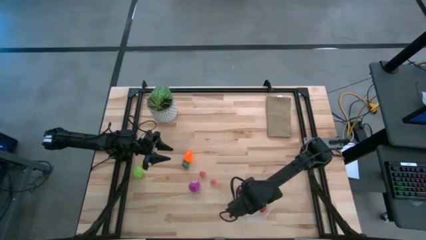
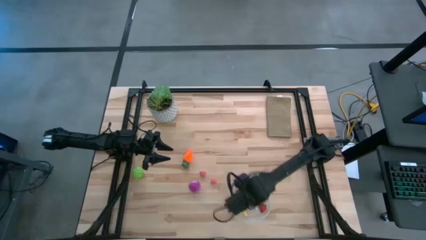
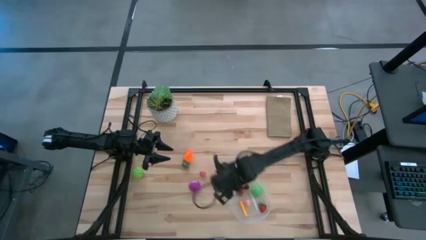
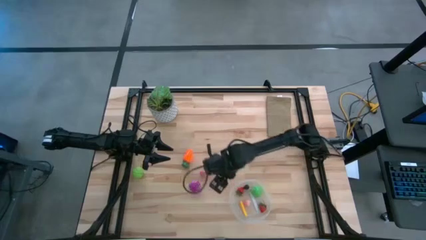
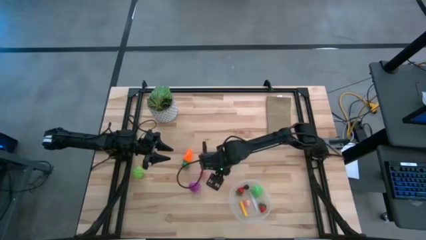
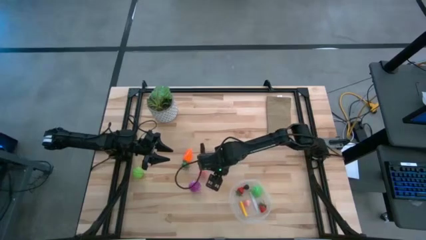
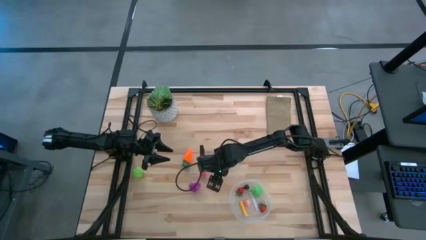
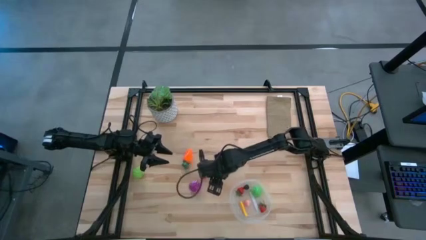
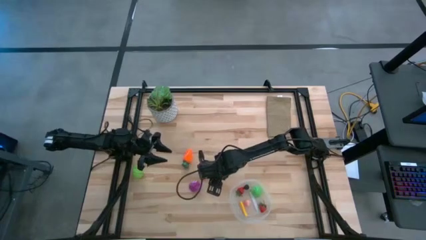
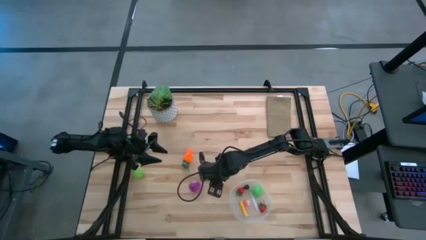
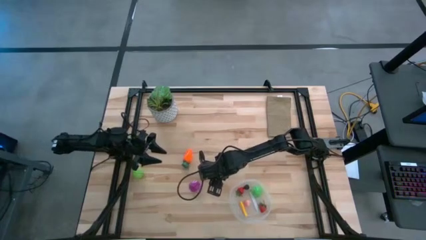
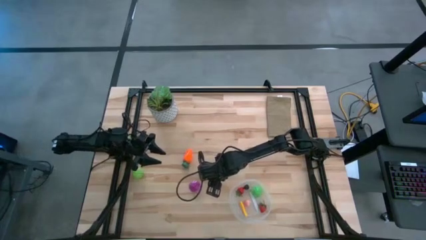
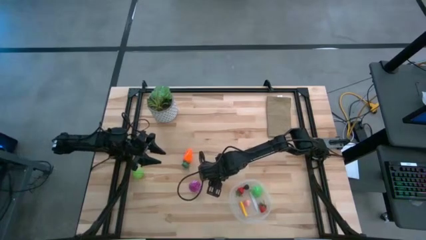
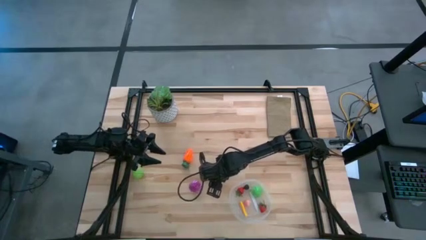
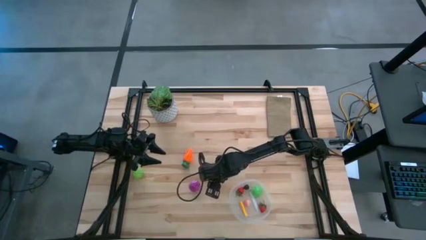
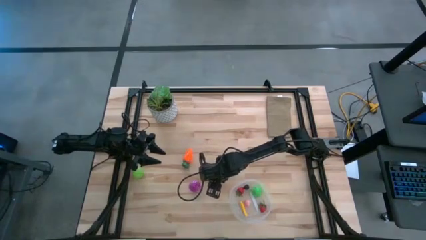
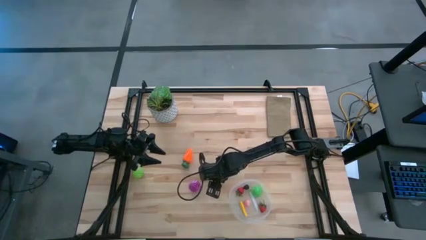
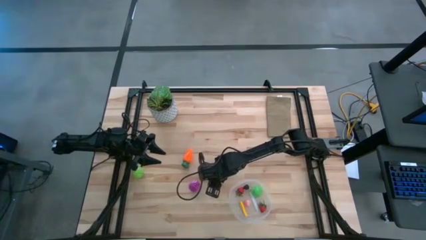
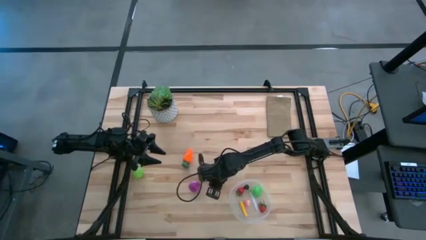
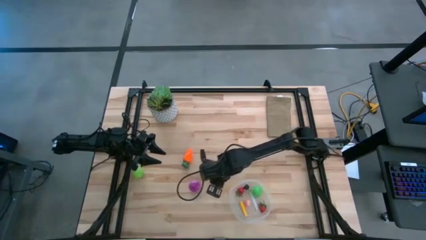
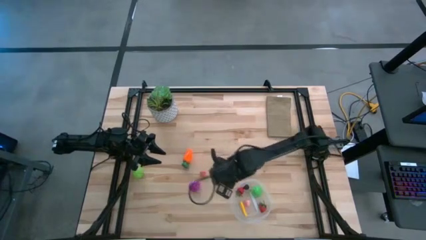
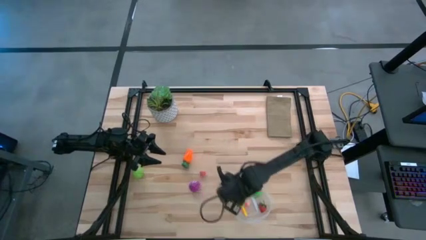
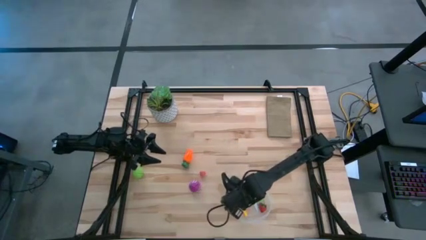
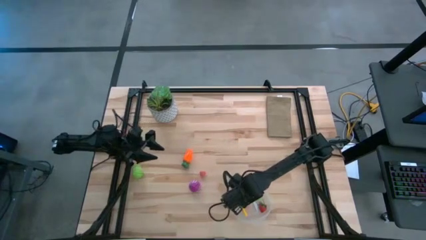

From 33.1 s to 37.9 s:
Task: Pick and placing Produce into tupperware
Put the bottom peach into the transparent bin

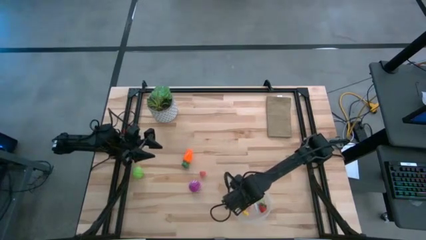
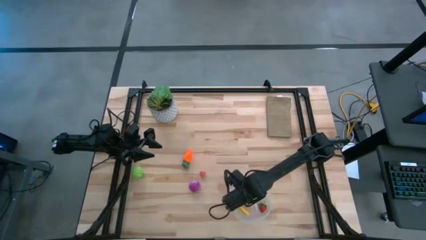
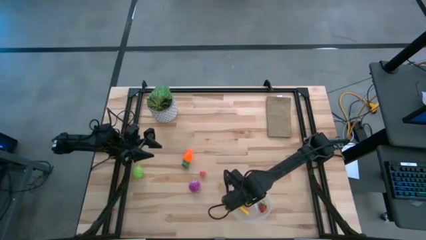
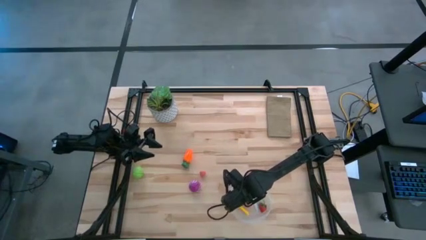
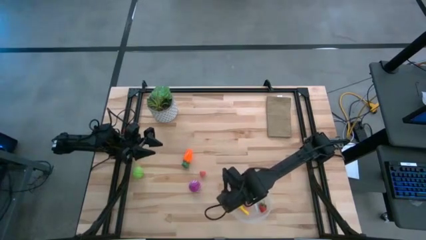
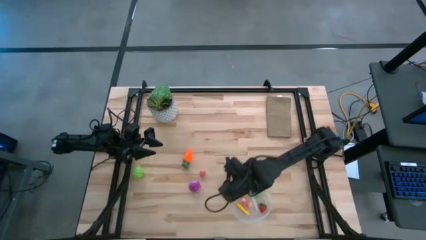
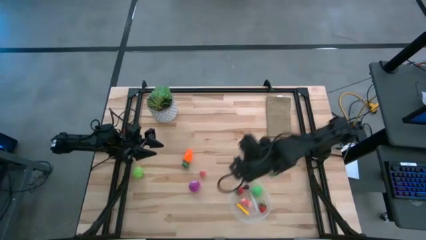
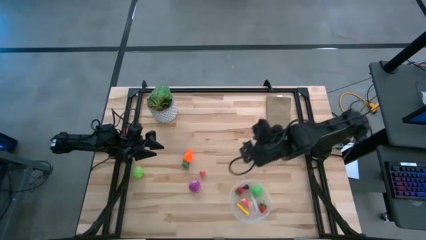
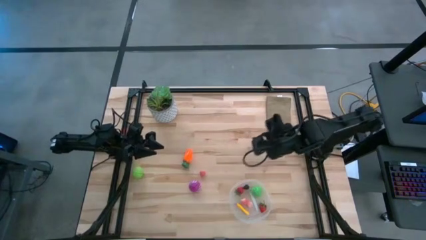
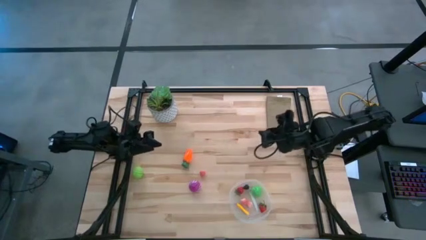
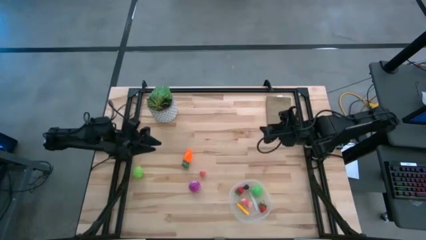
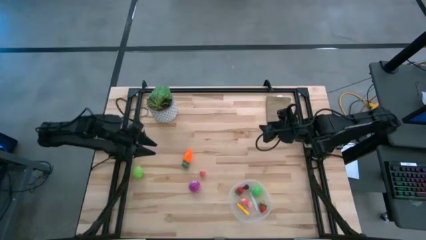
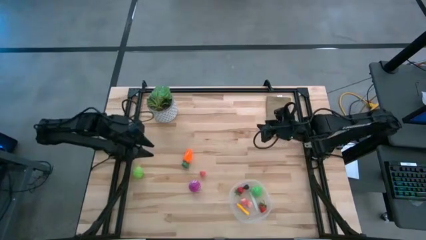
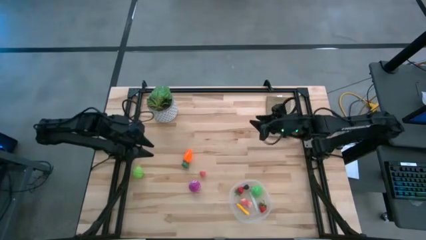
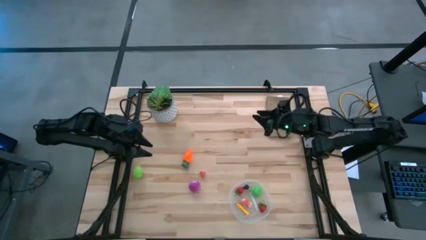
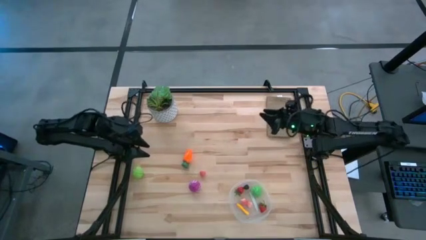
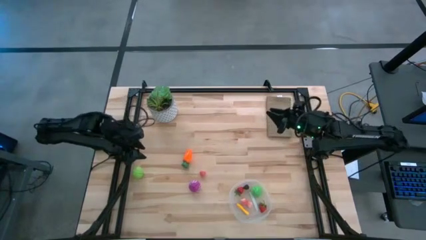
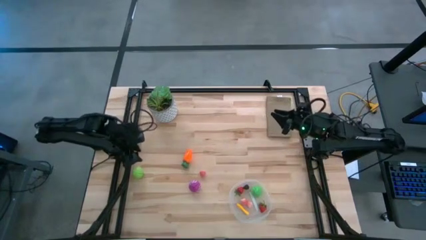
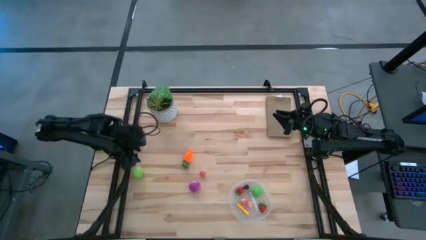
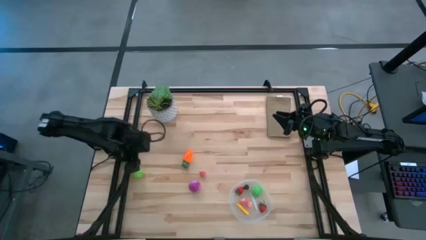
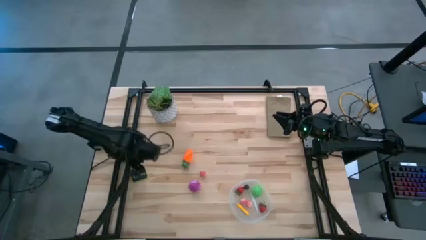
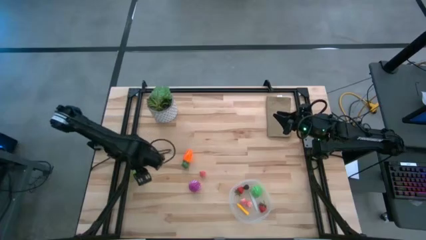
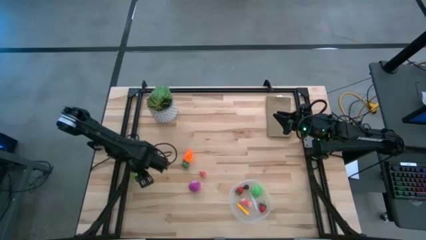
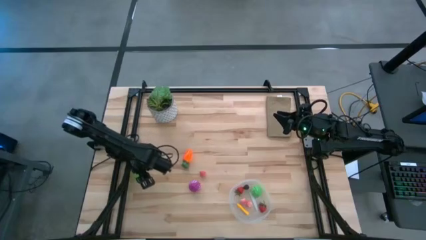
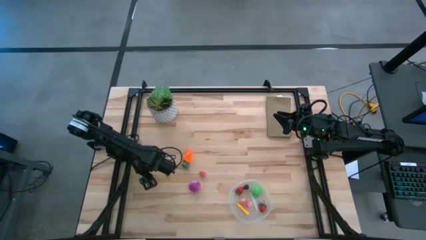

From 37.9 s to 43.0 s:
Put the cabbage into the transparent bin

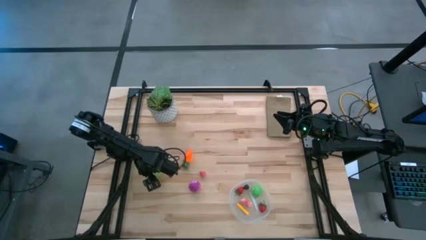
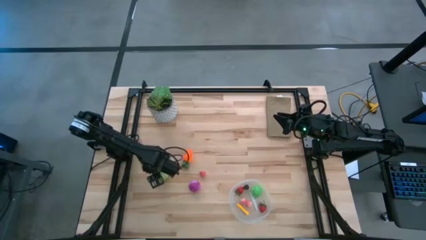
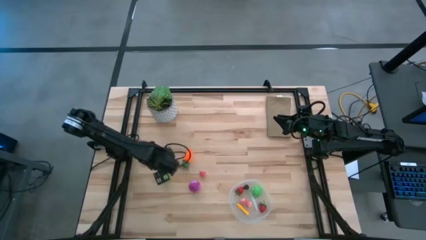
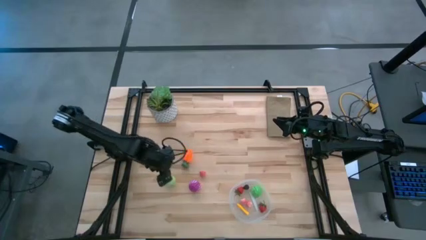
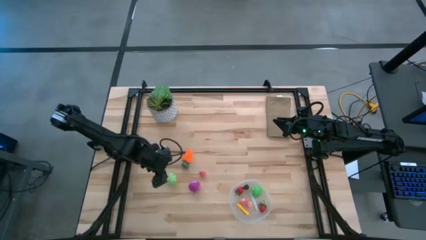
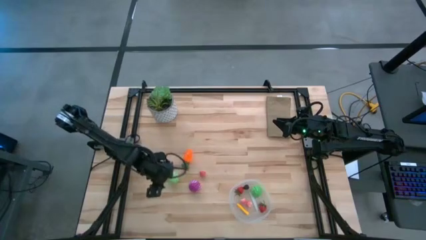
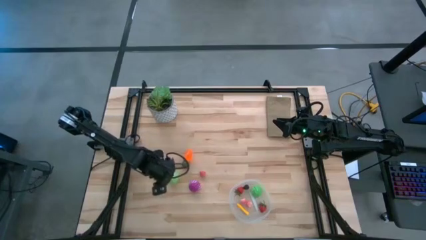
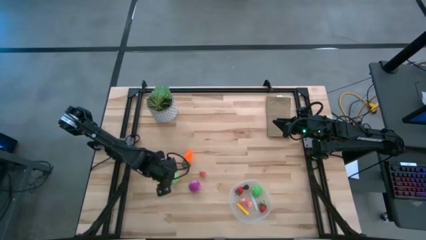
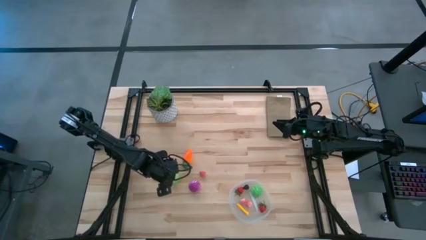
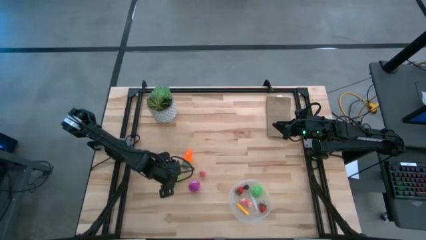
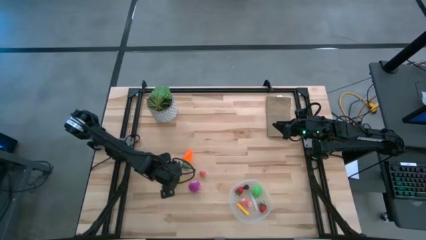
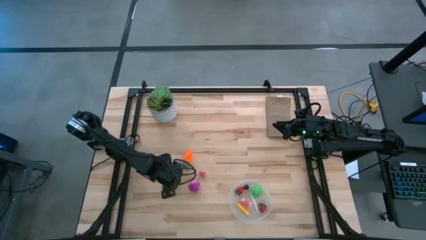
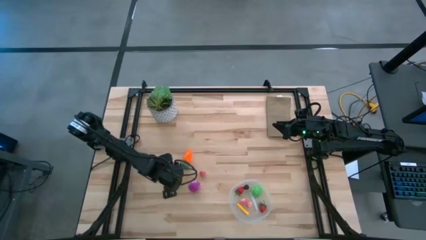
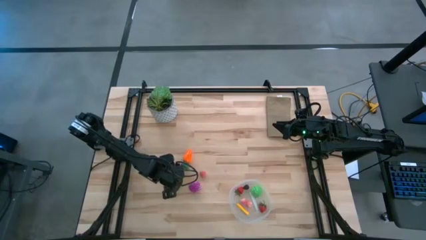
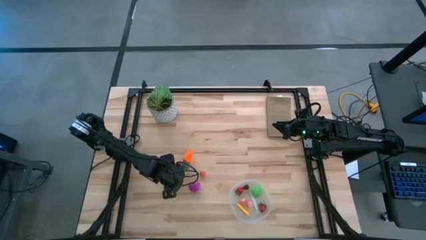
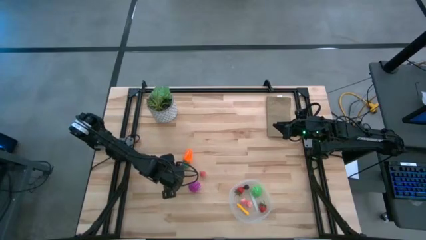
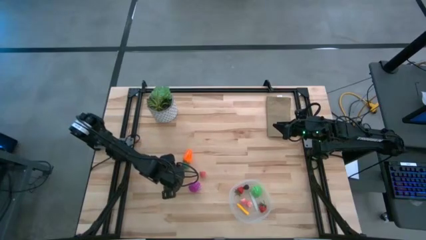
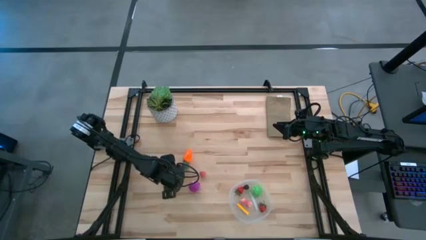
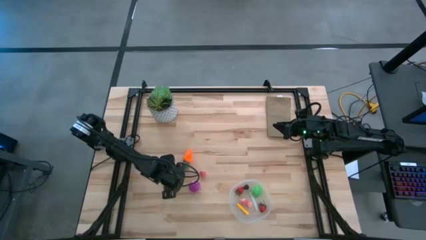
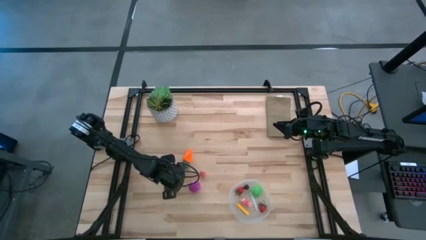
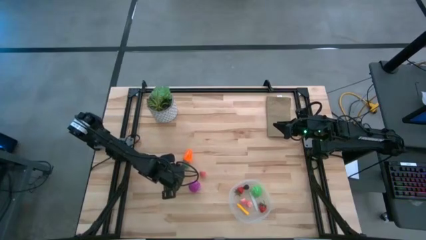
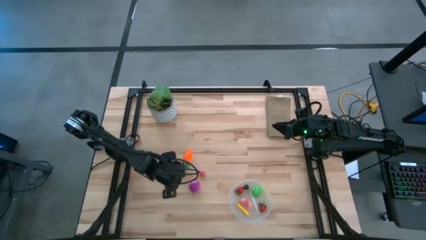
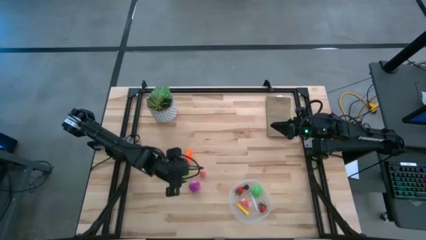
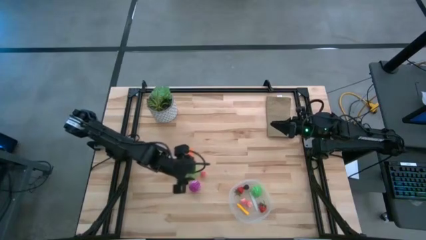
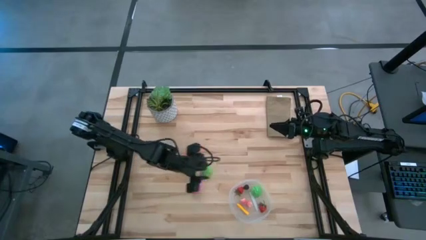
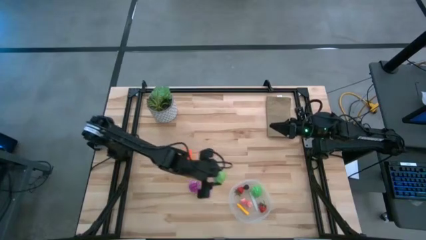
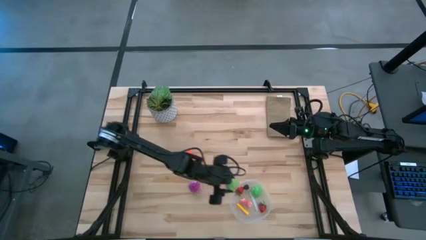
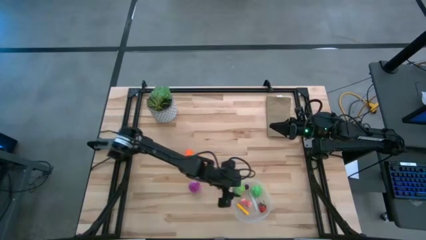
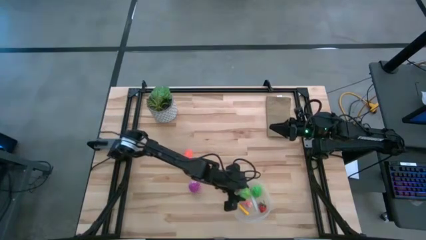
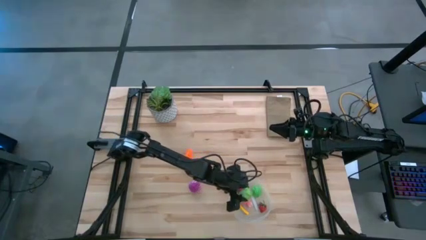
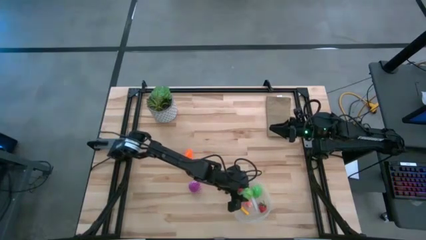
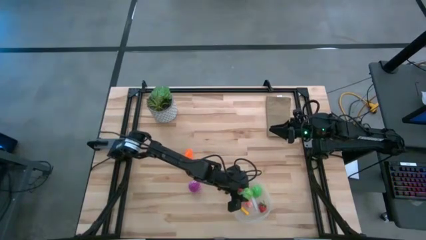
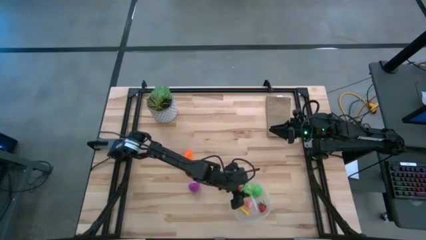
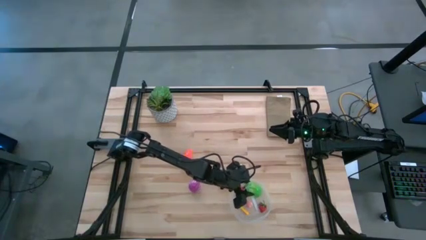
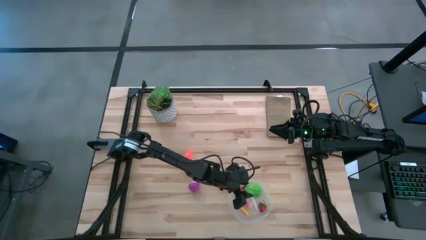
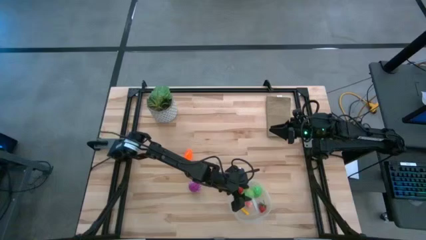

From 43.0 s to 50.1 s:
Put the cabbage into the transparent bin
